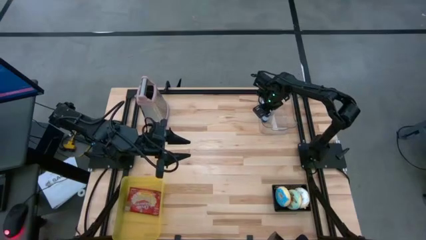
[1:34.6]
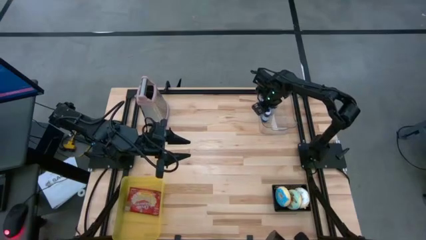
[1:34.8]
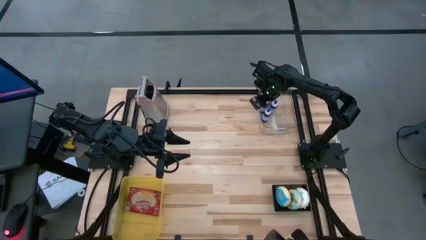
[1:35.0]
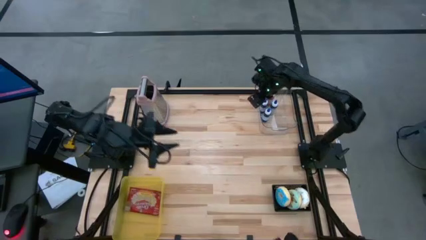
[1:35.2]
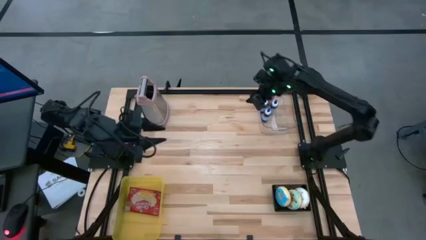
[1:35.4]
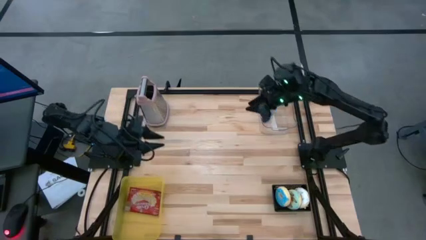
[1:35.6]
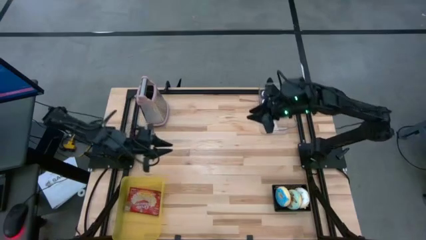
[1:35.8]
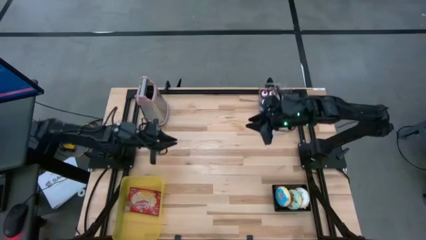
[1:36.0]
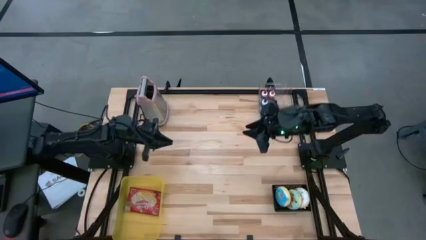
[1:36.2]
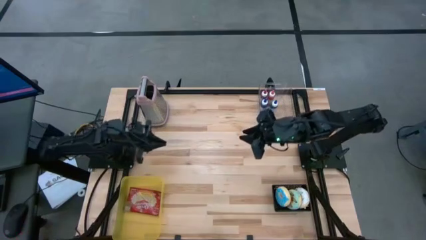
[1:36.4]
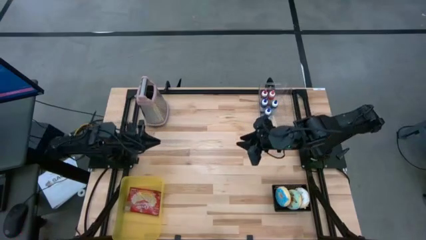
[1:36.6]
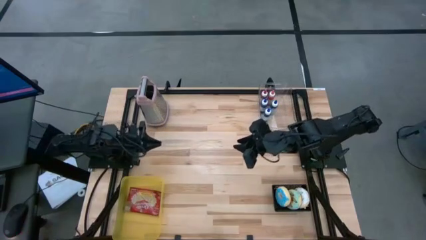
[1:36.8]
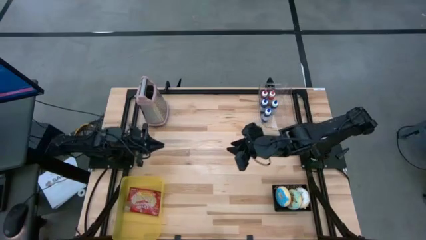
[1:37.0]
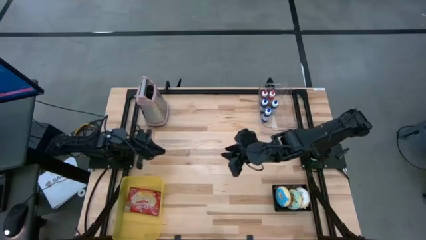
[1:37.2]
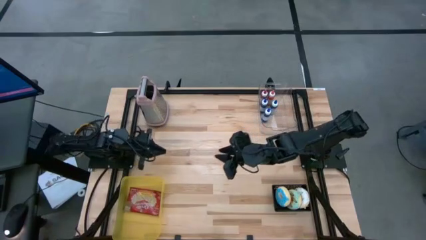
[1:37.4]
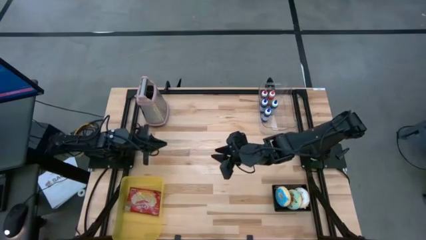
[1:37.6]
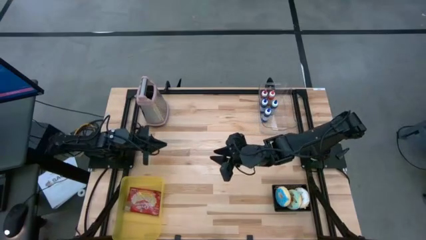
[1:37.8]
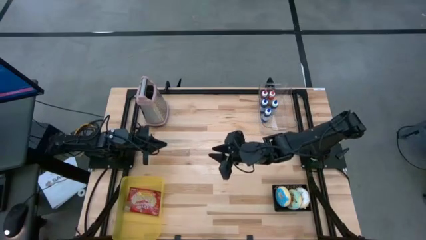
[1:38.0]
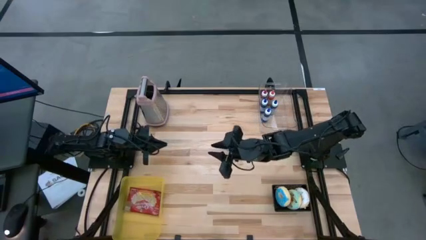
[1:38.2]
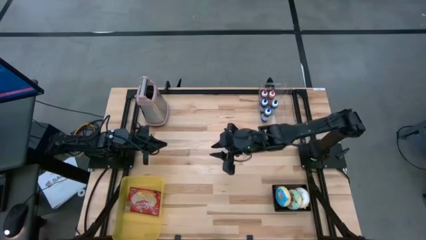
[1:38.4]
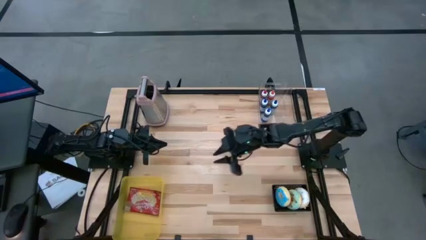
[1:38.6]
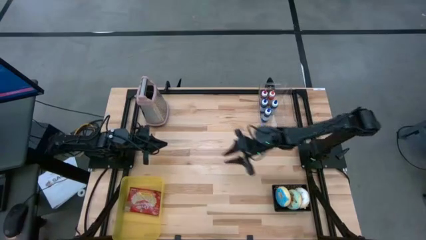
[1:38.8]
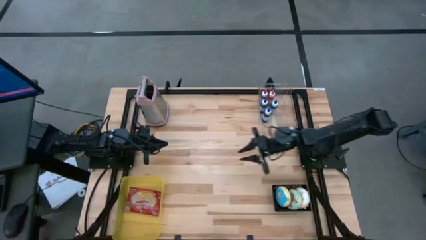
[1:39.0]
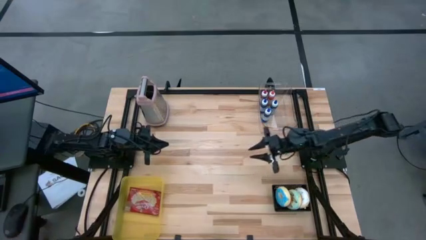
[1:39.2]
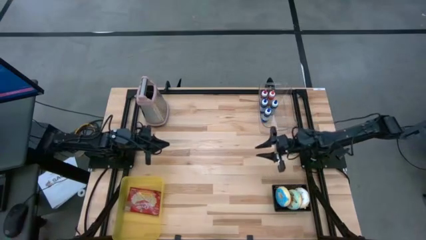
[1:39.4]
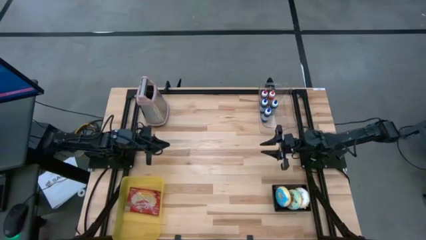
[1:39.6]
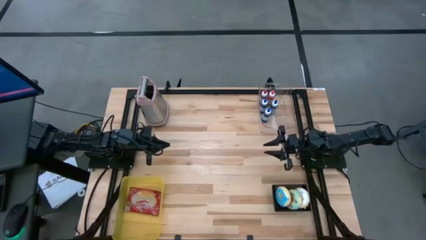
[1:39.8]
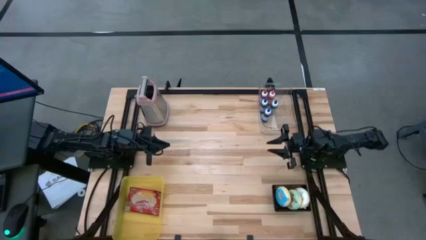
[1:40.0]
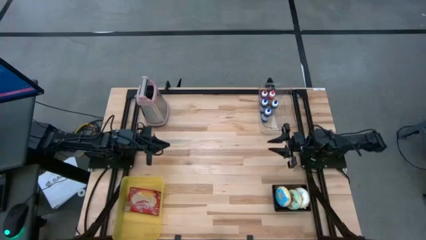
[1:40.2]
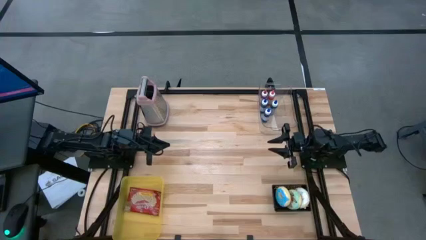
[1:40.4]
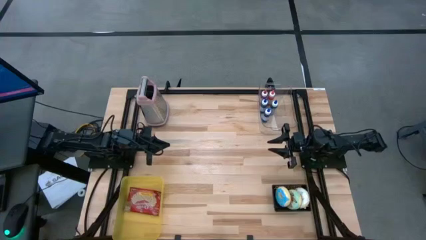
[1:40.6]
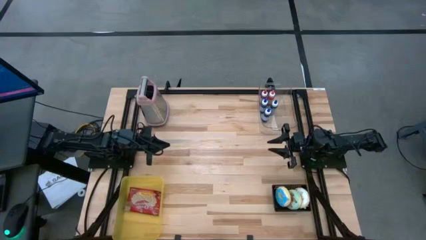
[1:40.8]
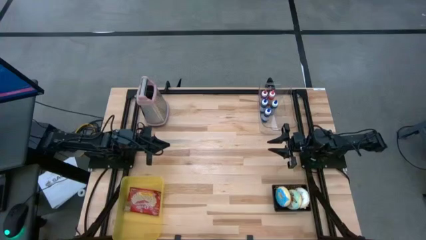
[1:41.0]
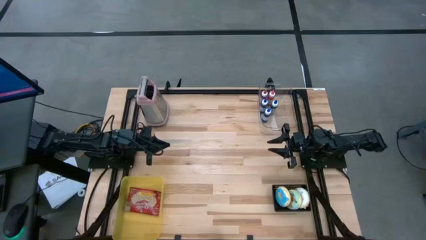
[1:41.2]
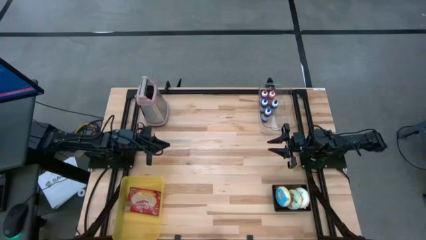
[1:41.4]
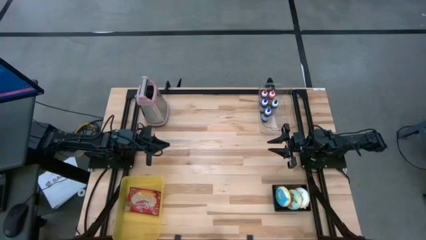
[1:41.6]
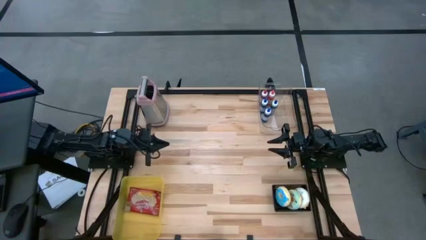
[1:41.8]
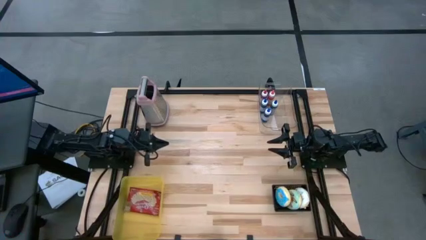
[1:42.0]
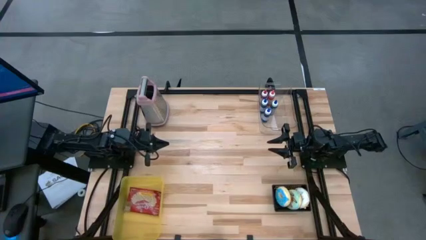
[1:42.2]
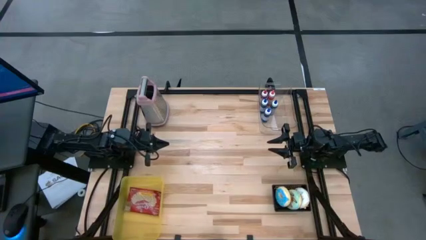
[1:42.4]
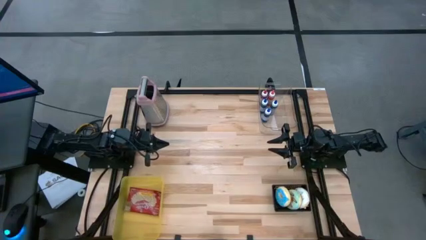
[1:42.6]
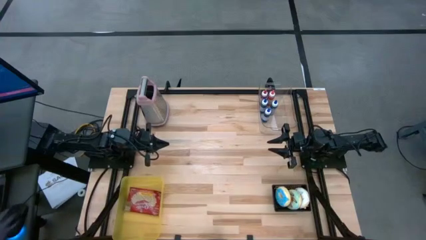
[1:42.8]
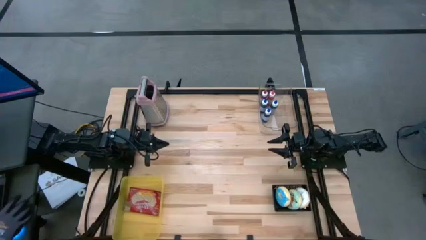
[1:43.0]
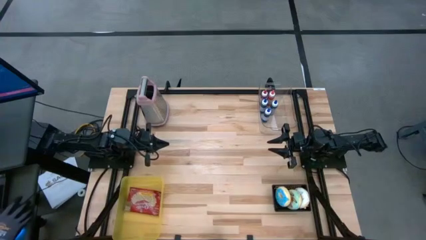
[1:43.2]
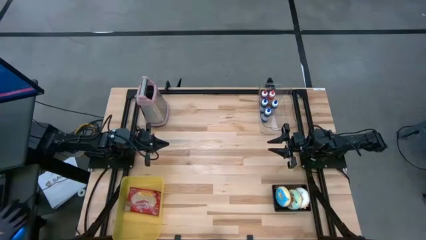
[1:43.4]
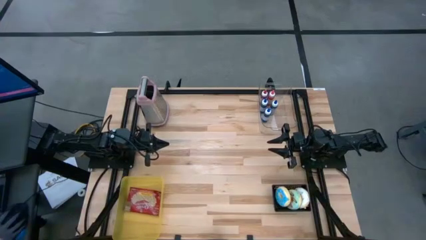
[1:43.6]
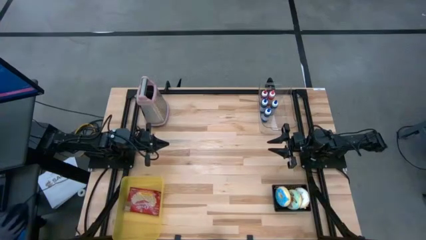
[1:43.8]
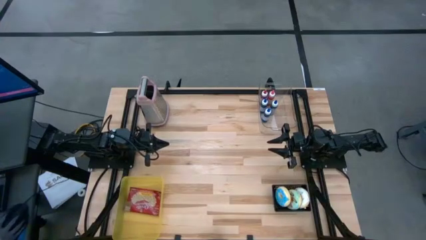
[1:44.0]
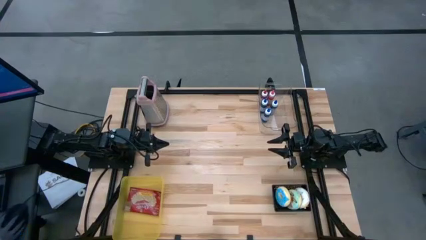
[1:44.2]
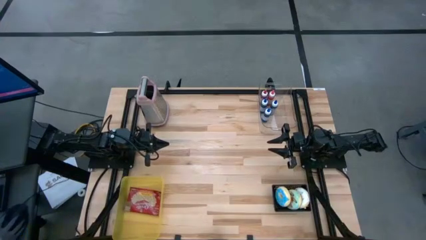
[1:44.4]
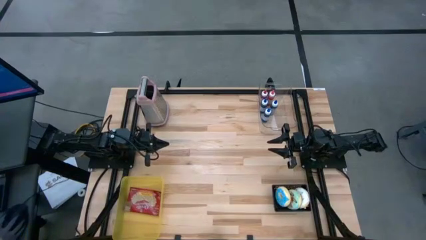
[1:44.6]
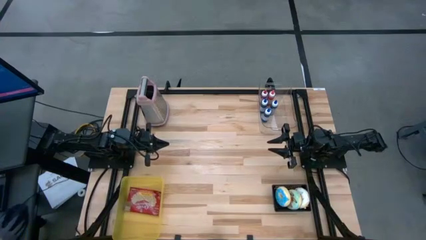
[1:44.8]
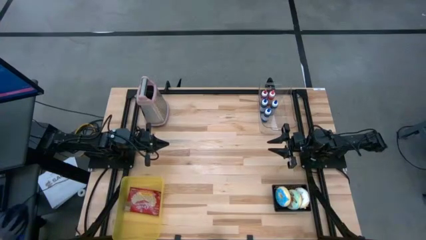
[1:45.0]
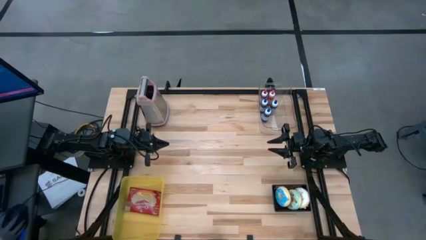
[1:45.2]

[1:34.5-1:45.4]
Return to Home Position
